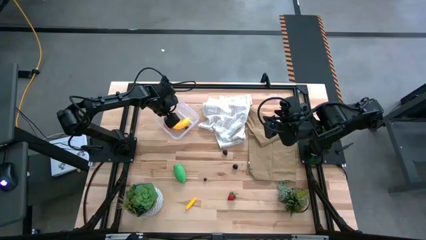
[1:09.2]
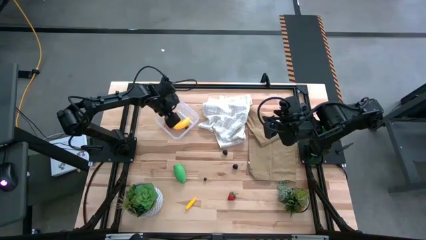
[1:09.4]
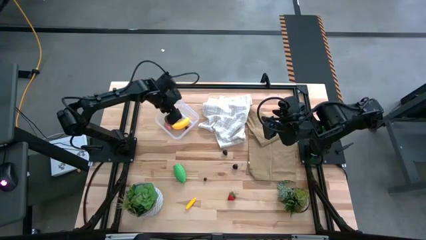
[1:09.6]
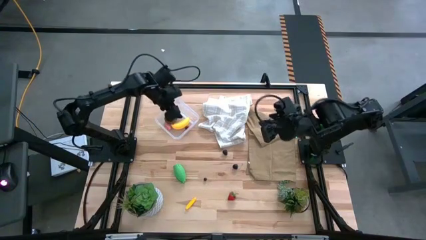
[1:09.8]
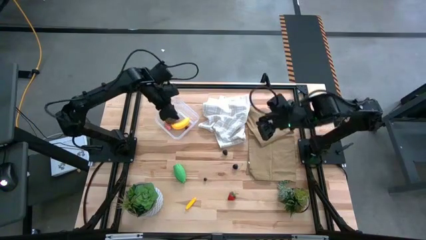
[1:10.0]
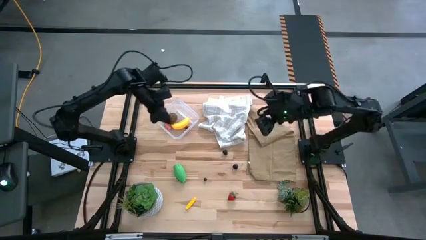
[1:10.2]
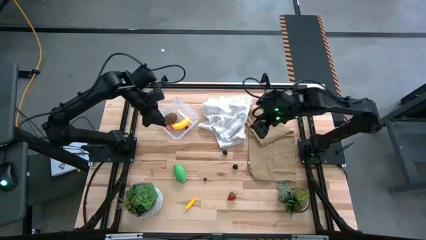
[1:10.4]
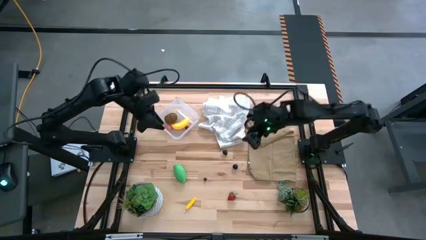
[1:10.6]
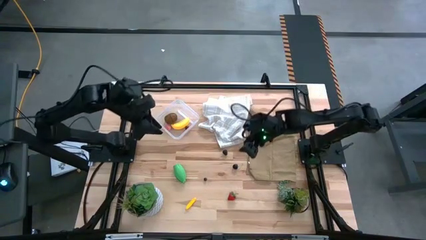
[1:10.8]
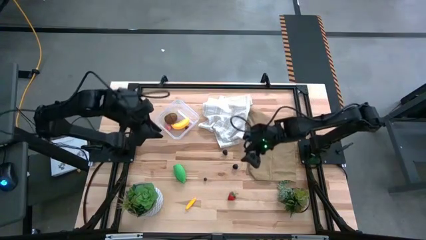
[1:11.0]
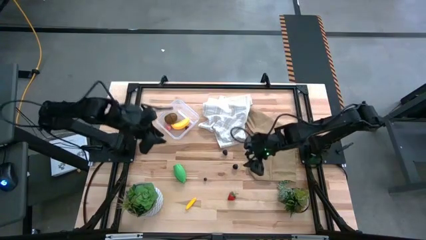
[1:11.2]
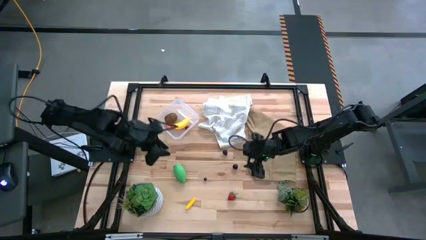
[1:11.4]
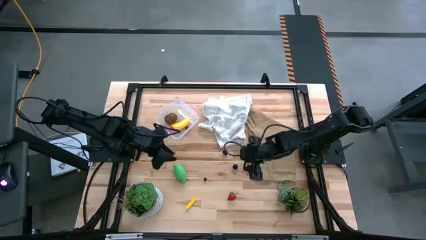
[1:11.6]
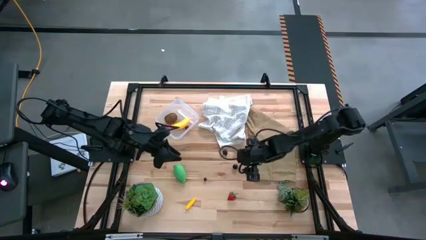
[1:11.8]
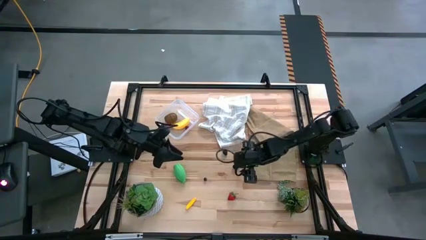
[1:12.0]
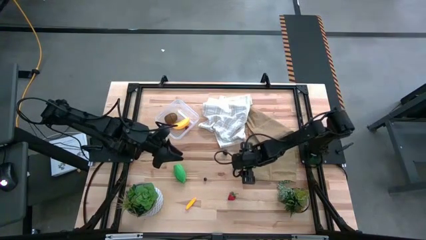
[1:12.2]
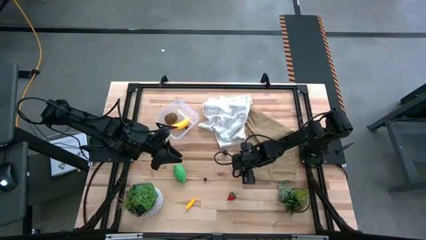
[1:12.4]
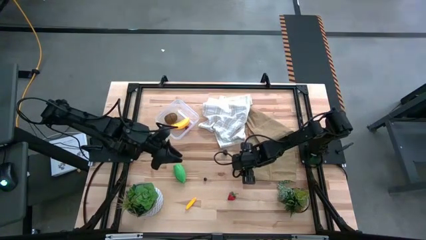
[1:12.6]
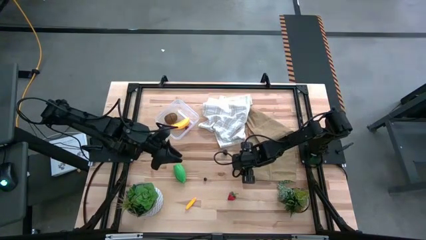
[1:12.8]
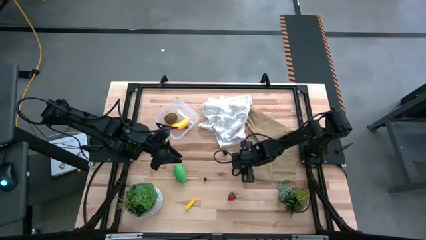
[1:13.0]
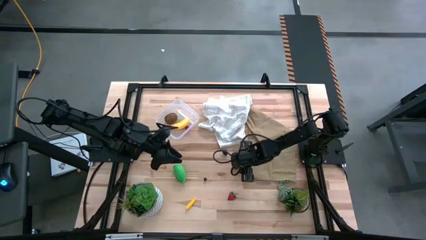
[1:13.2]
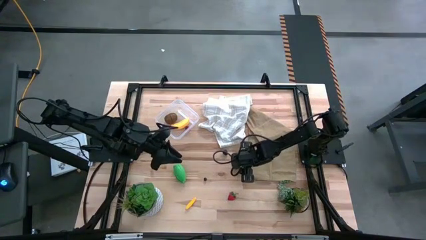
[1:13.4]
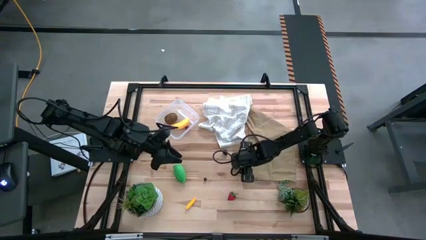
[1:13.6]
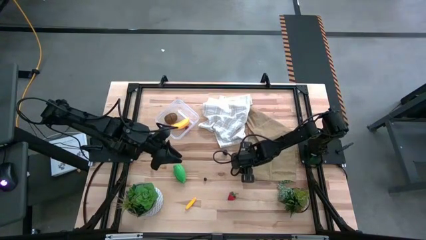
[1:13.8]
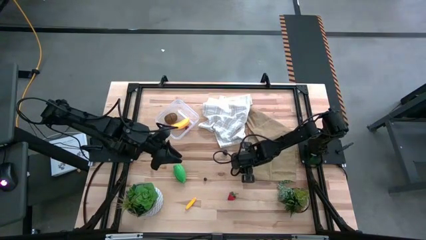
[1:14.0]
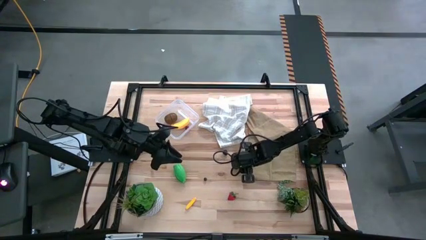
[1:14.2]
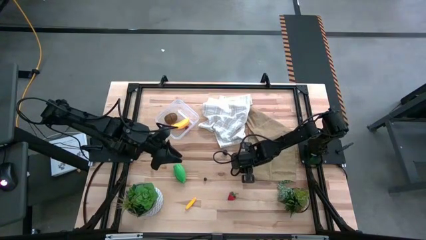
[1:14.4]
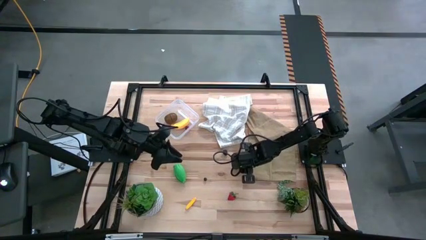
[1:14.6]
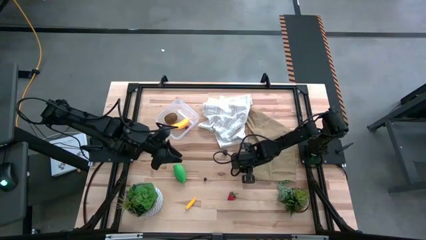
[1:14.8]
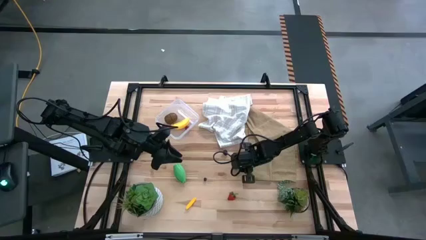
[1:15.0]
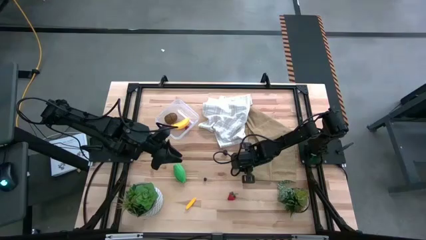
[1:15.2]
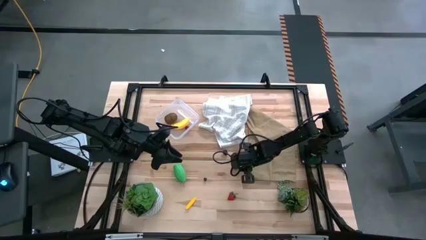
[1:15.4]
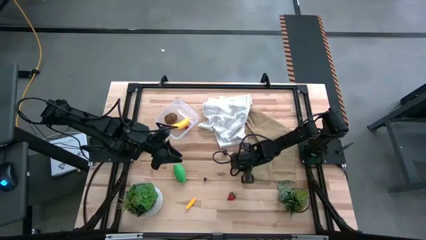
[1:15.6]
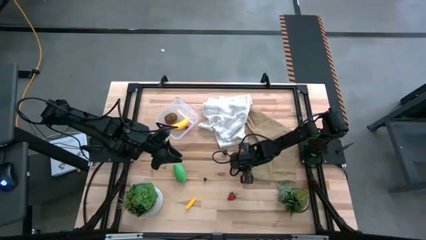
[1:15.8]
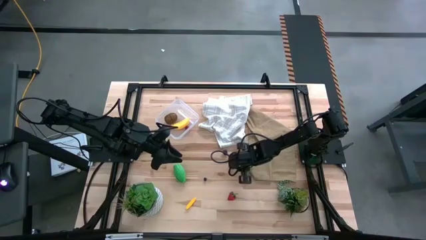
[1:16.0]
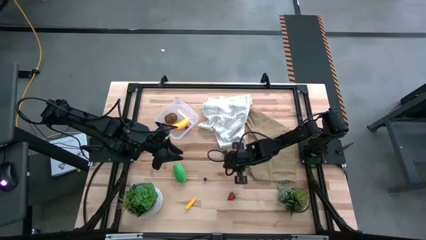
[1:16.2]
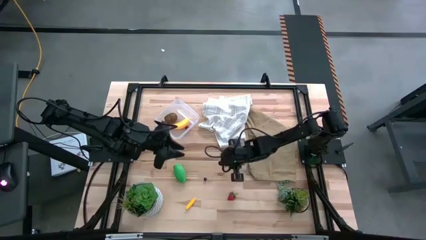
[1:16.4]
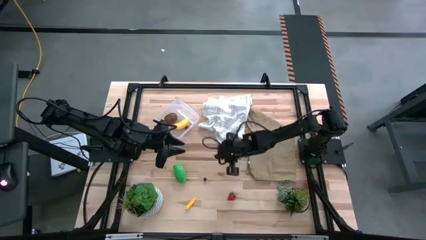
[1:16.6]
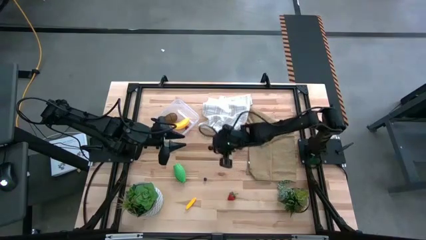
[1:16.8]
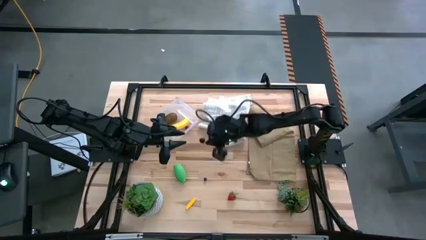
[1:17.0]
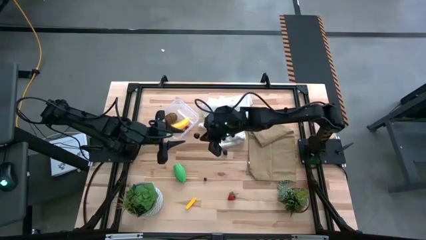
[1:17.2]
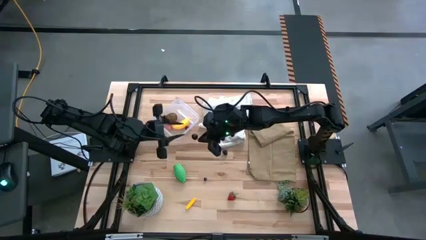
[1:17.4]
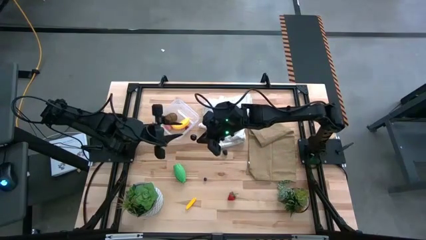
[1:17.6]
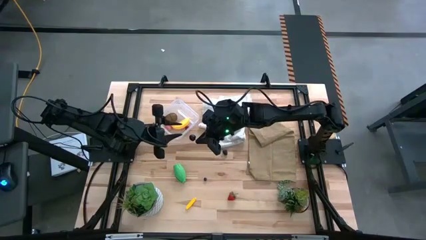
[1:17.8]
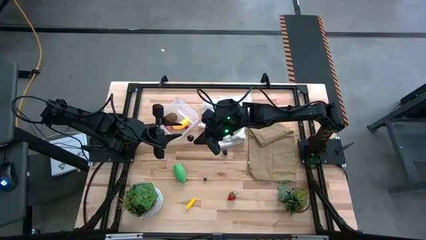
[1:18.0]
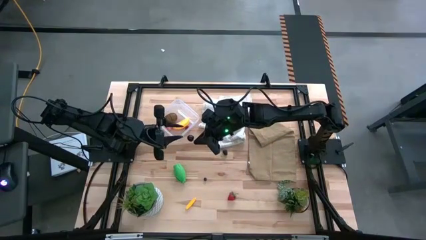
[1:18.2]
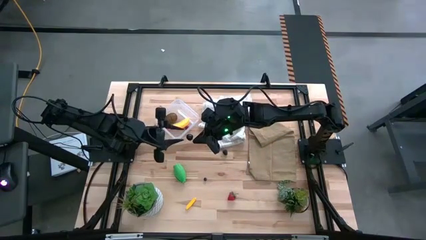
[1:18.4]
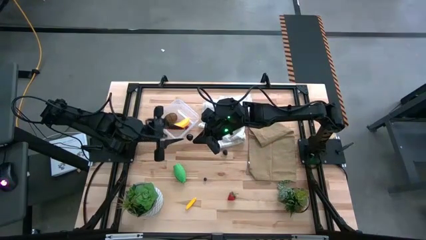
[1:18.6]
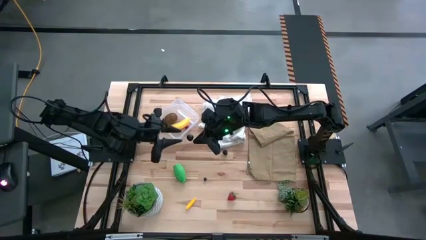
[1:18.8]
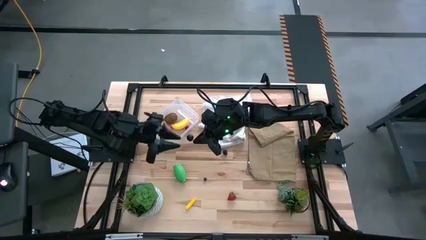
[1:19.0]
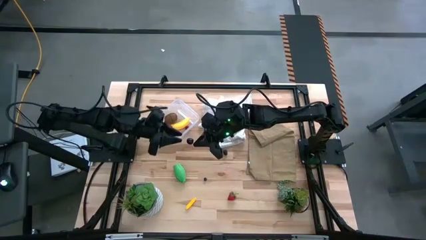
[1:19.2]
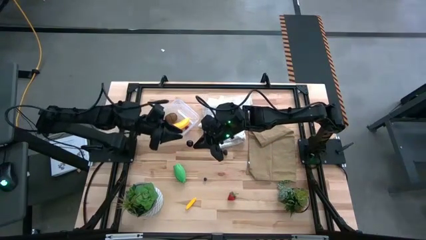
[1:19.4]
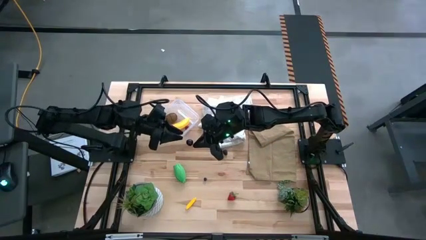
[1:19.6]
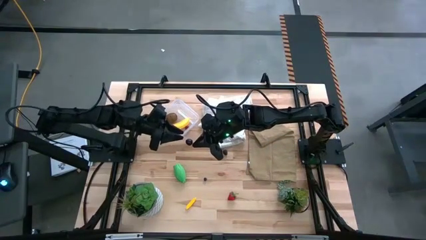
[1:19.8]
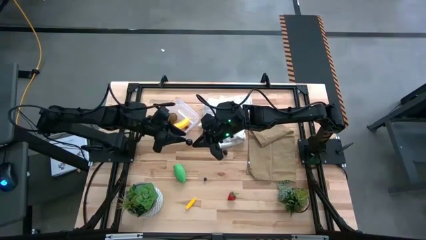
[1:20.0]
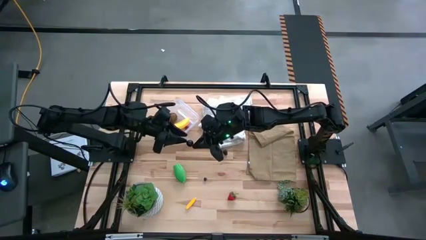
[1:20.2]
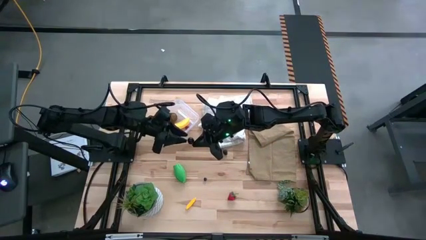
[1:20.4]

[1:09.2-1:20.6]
Task: Pick and placing Produce into tupperware
Put the black cherry into the transparent bin

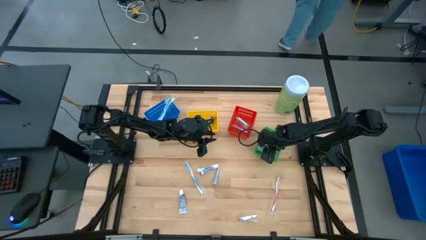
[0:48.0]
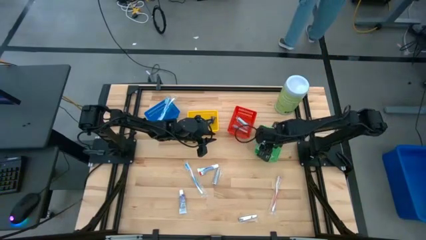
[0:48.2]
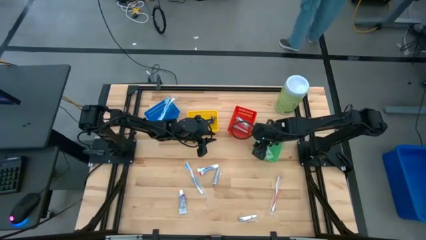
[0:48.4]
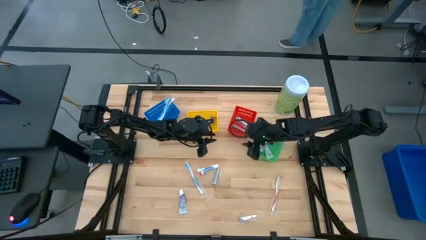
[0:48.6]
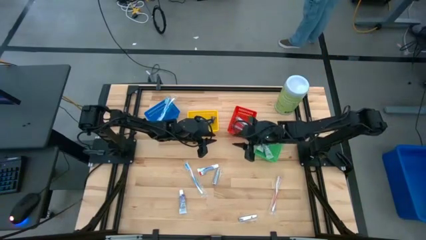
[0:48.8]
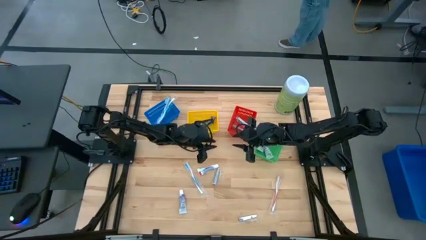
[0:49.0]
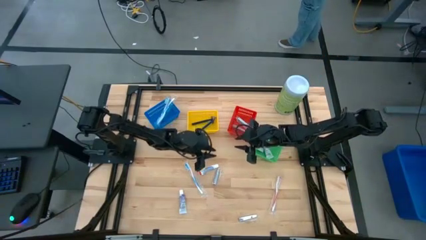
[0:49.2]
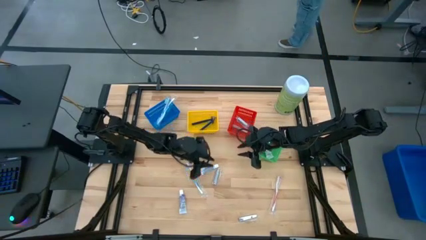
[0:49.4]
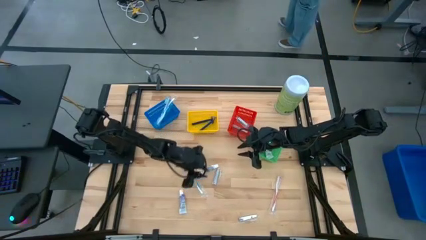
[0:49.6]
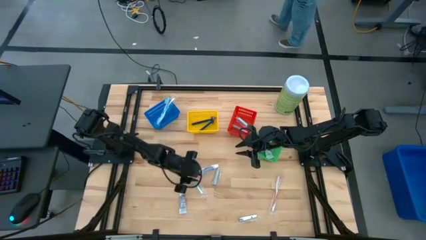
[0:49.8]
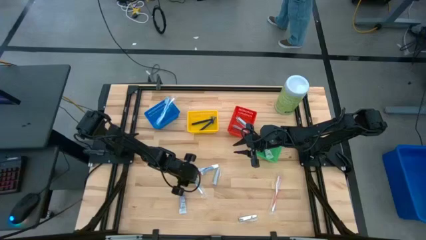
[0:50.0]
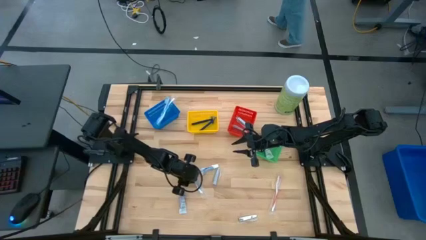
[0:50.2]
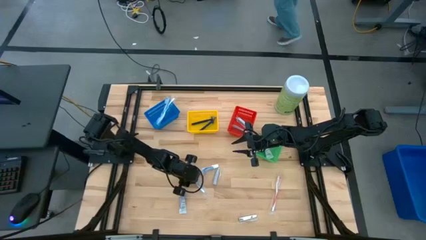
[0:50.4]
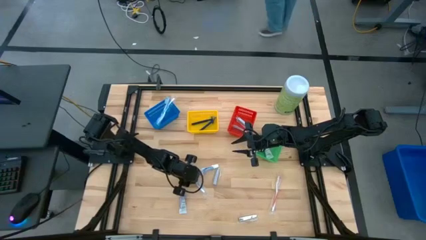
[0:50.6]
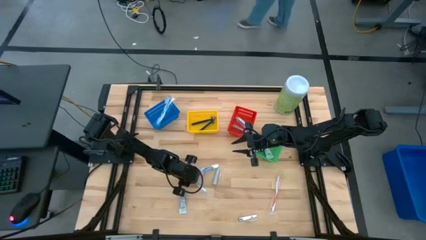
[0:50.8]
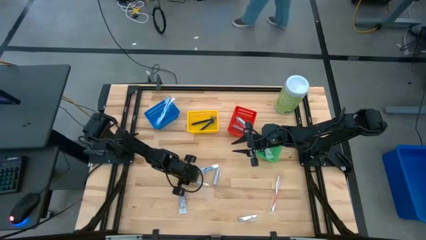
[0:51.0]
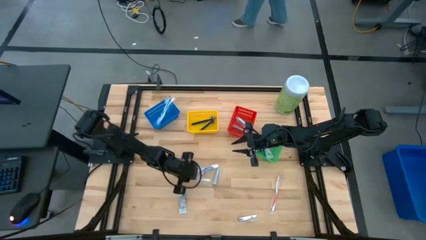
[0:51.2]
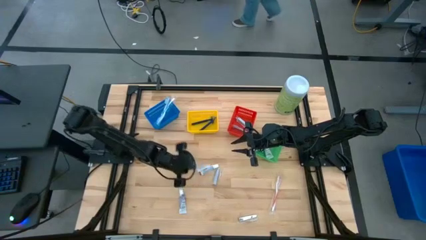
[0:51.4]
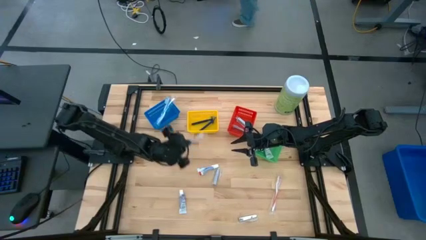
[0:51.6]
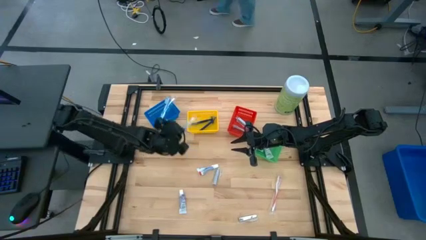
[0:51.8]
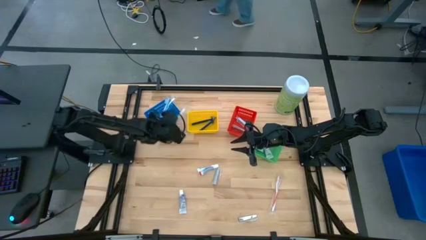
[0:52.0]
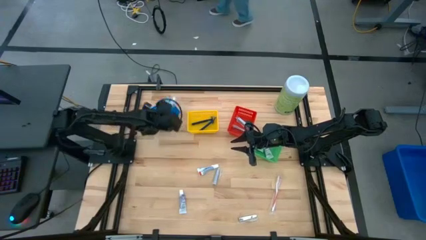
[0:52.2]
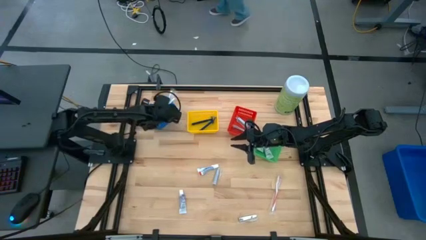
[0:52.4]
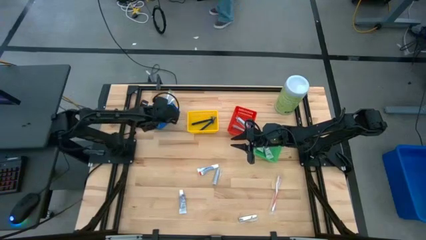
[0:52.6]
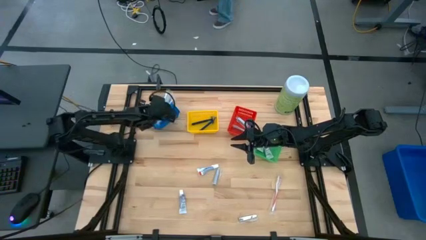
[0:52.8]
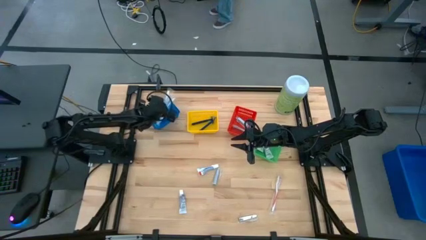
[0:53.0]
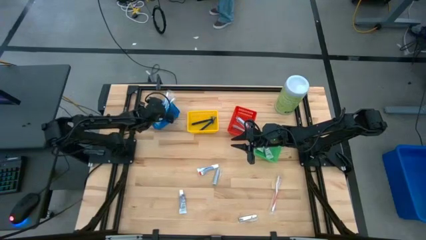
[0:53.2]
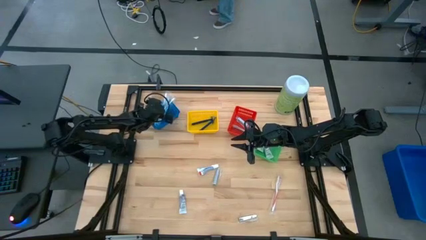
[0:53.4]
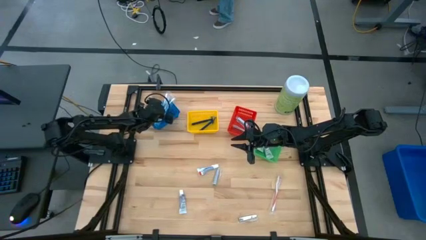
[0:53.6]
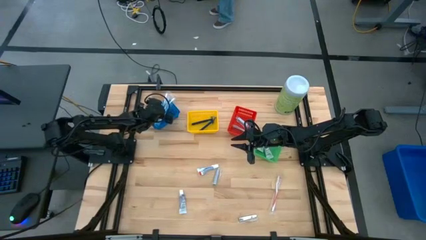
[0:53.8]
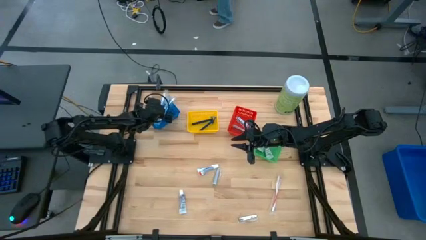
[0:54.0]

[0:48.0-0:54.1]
Task: Pick & Place Travel size toiletries
Put the blue toothbrush into the blue bin
